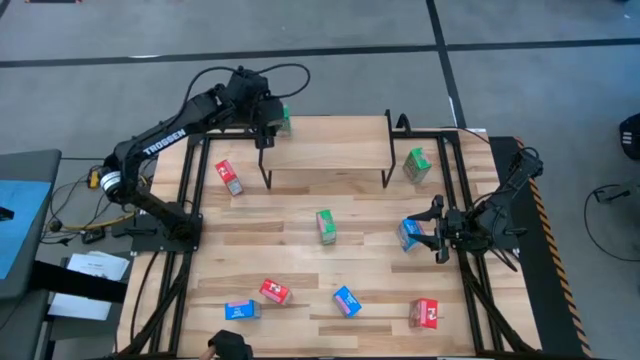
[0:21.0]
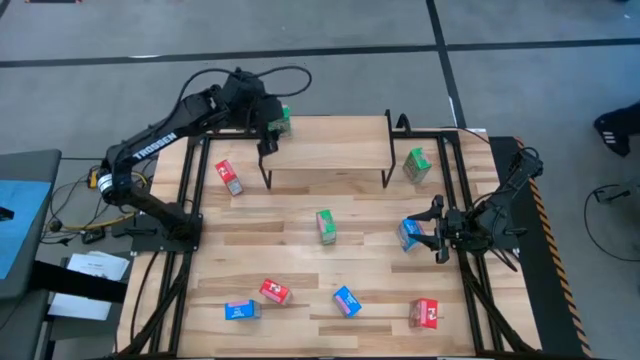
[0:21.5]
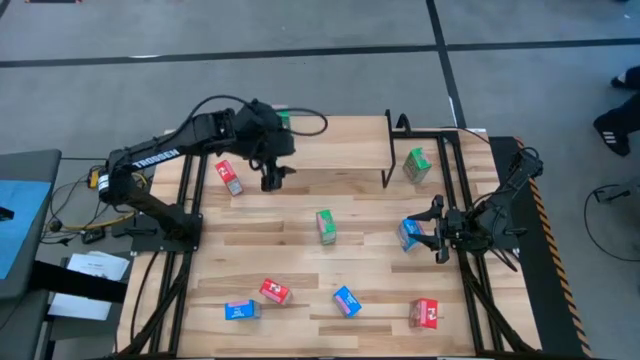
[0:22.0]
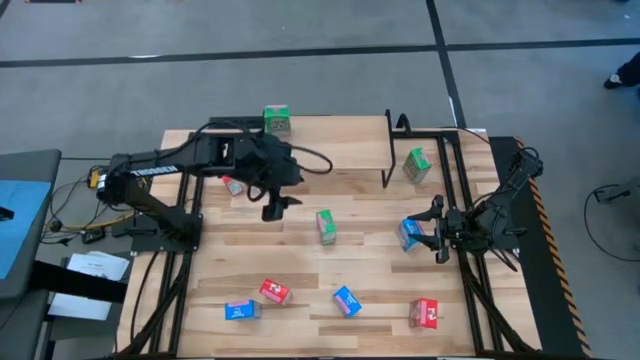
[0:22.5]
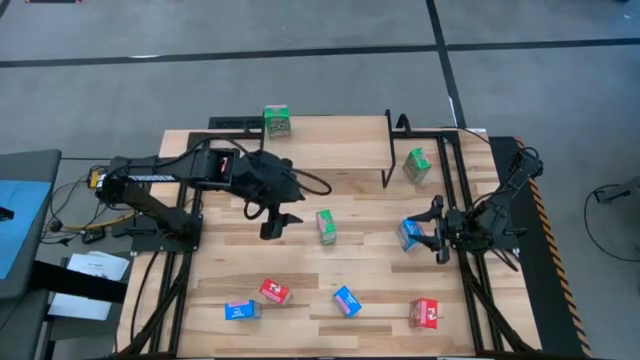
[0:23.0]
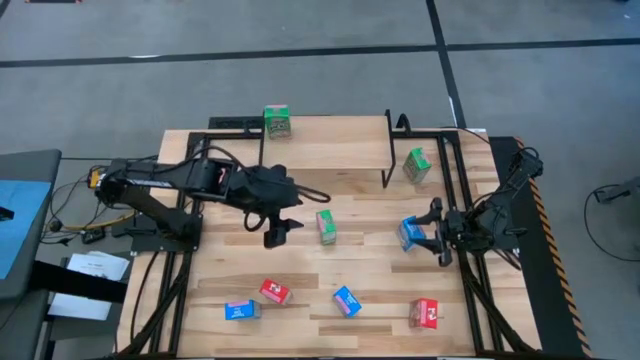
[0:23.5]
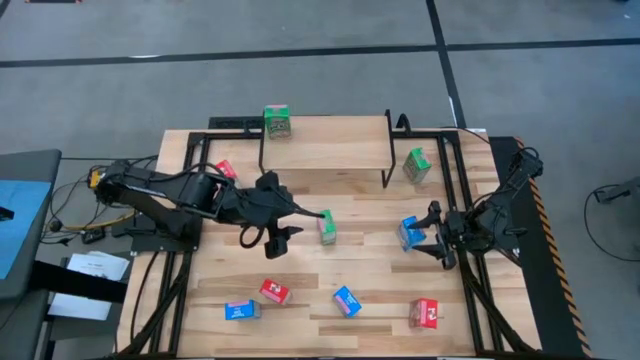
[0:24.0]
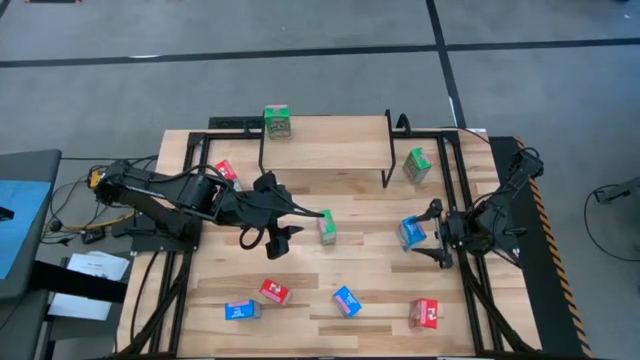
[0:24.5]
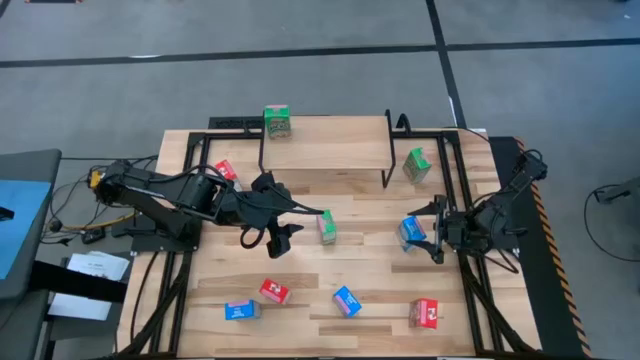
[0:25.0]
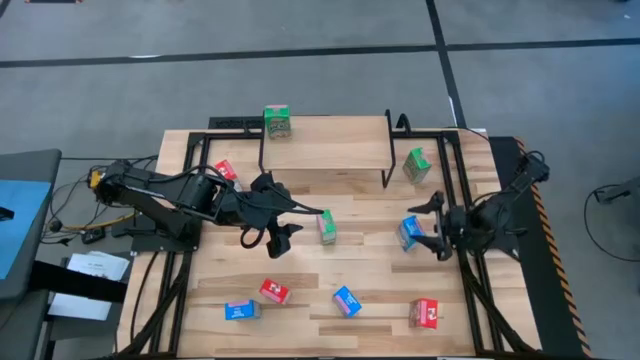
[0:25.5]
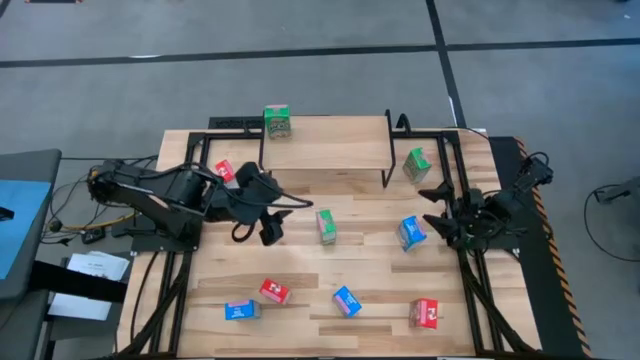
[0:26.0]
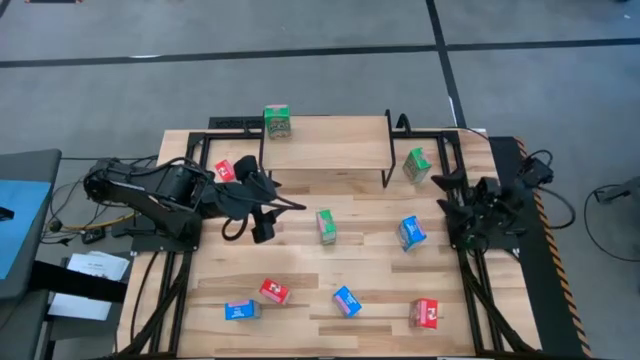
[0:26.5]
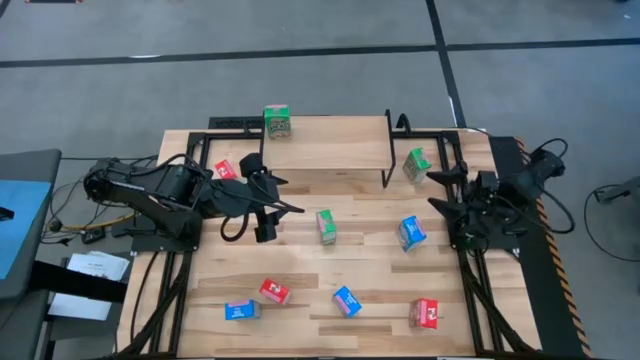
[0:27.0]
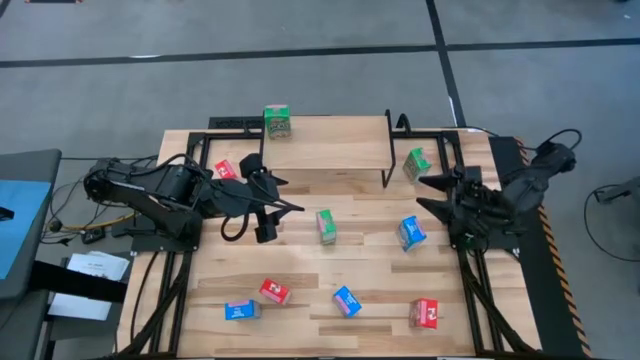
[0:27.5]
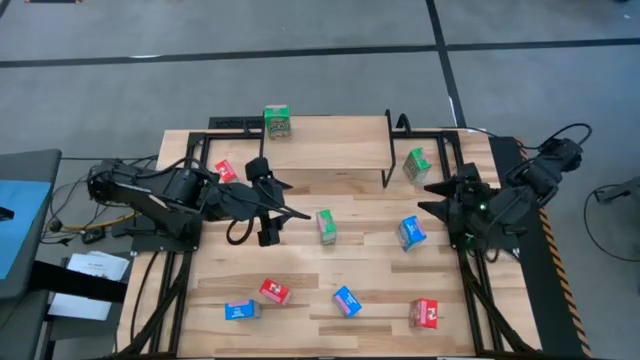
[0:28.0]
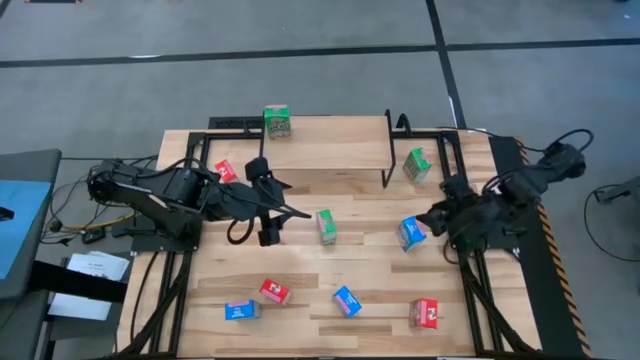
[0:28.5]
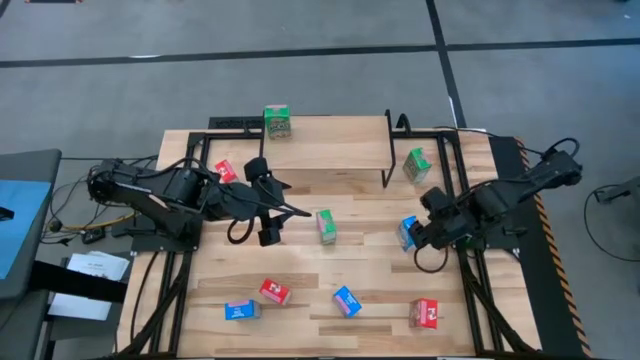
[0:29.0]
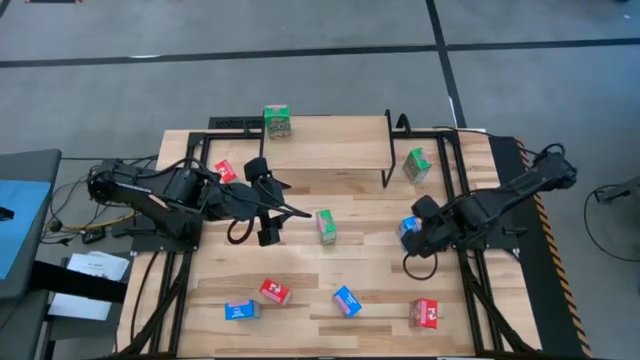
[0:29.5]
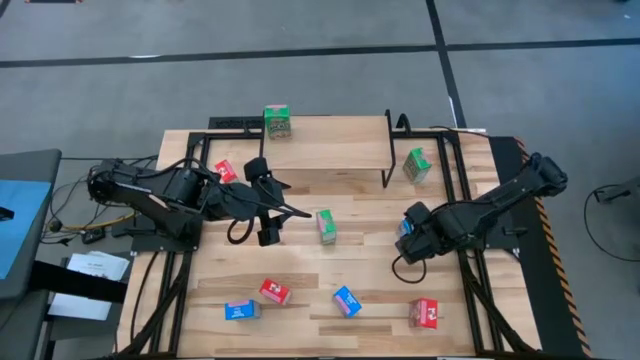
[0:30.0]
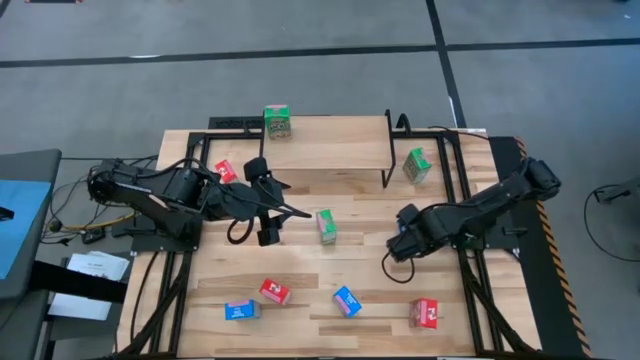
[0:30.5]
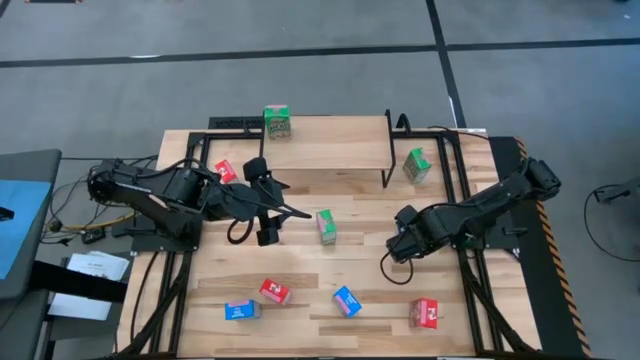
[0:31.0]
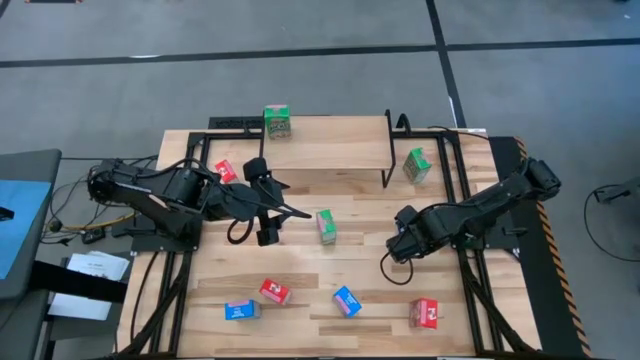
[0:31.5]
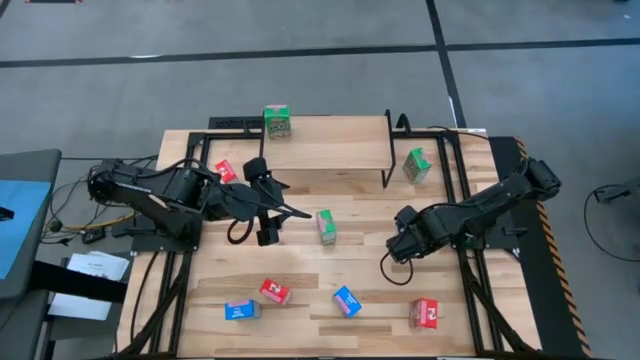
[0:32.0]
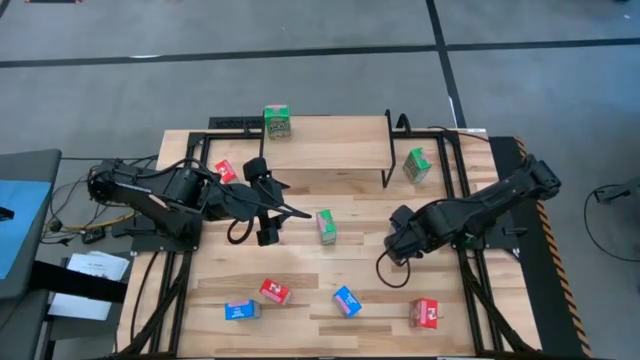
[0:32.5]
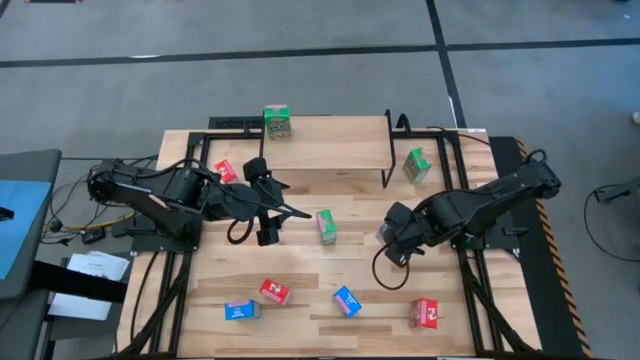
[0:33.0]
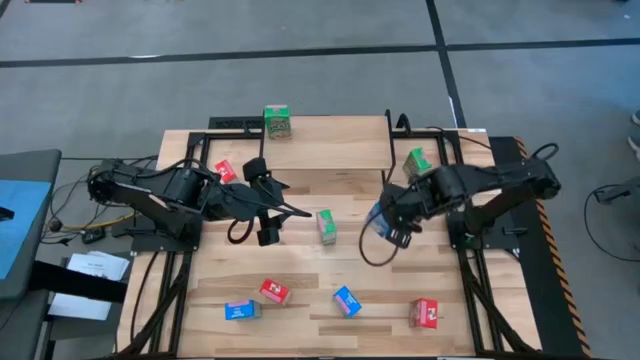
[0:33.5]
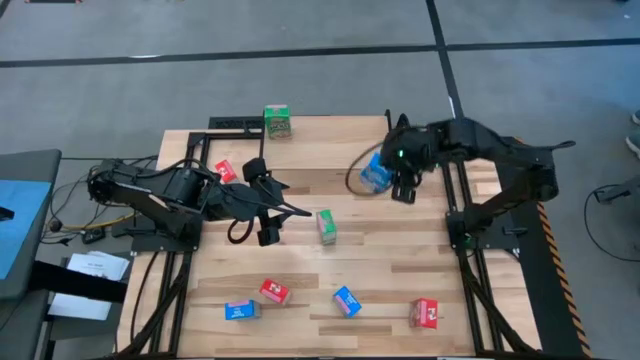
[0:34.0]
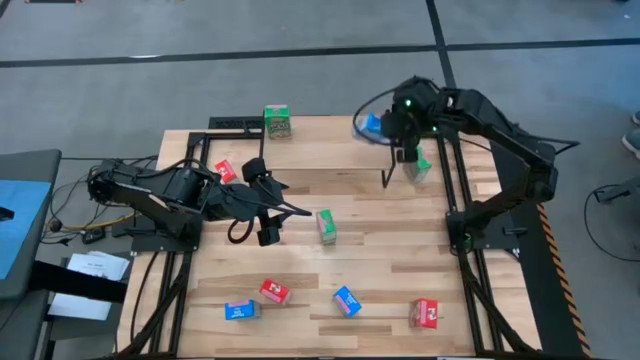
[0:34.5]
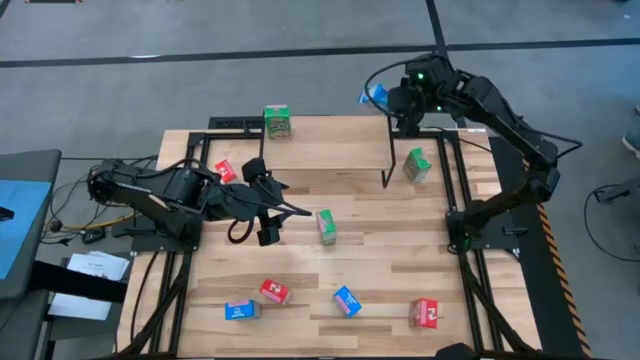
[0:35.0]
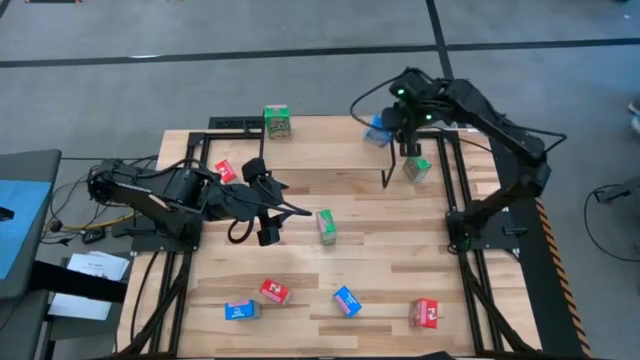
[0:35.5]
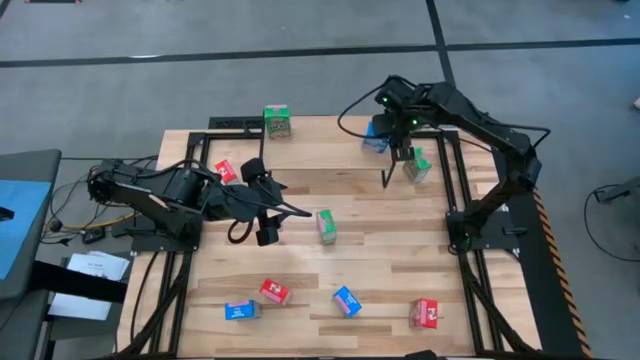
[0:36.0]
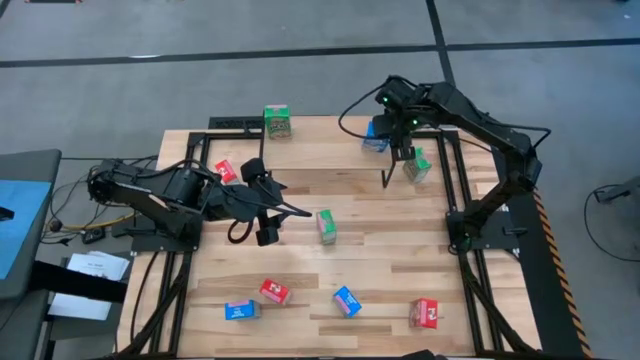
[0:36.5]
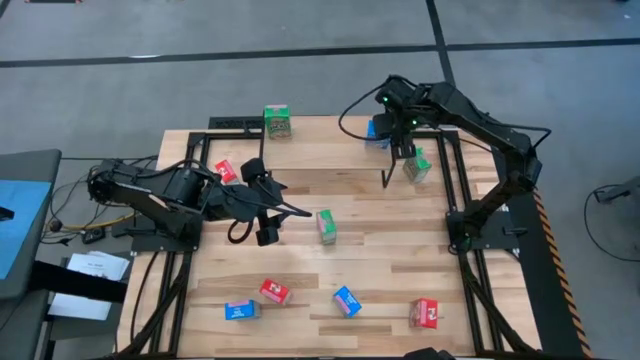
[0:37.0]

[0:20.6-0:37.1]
Task: Stack cereal on shelf
Put the top right blue cereal box on the shelf

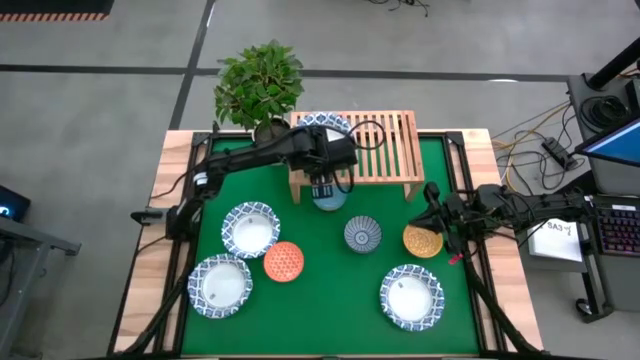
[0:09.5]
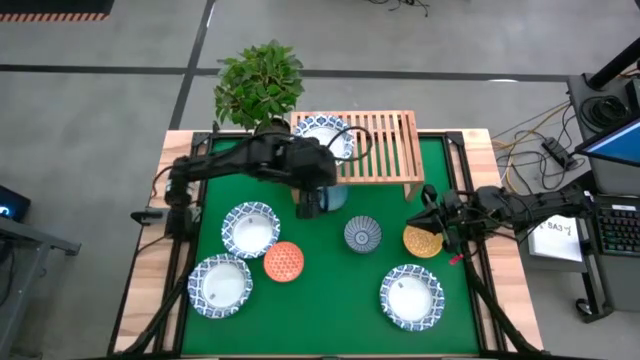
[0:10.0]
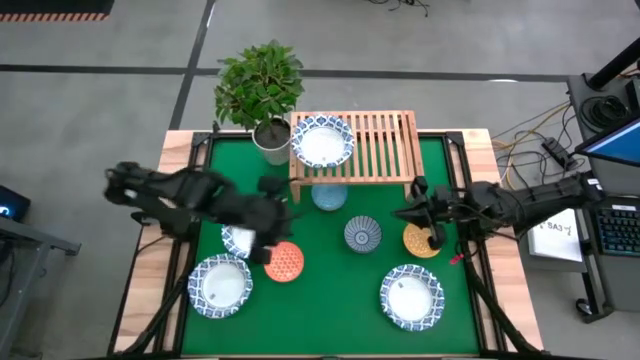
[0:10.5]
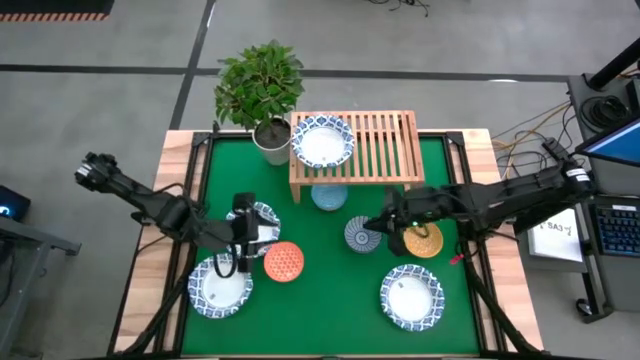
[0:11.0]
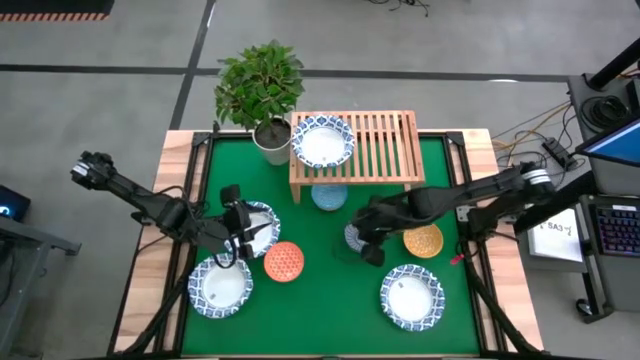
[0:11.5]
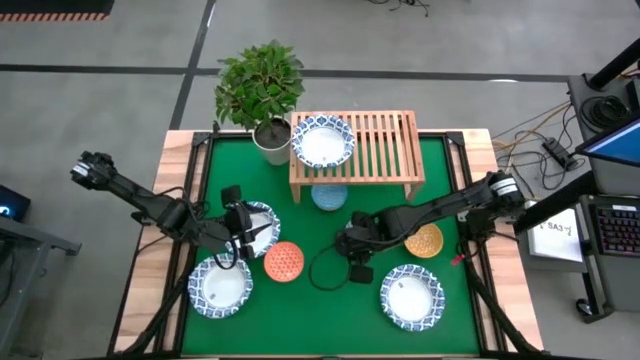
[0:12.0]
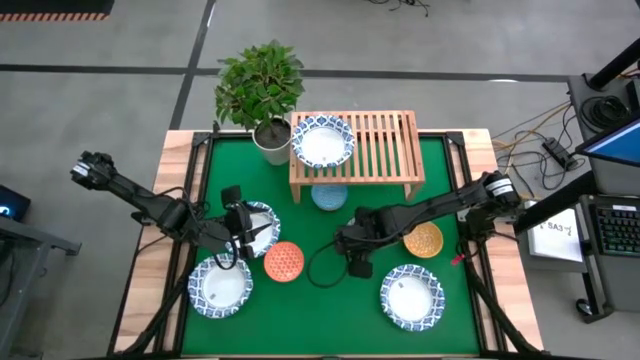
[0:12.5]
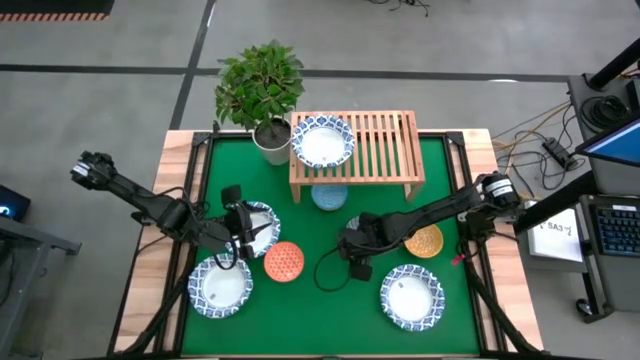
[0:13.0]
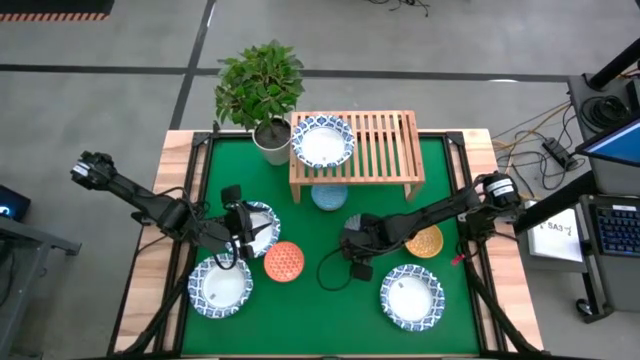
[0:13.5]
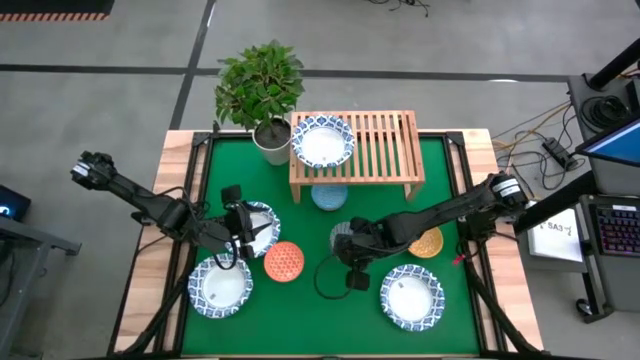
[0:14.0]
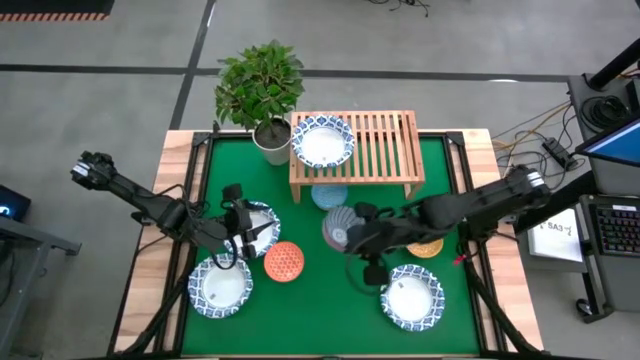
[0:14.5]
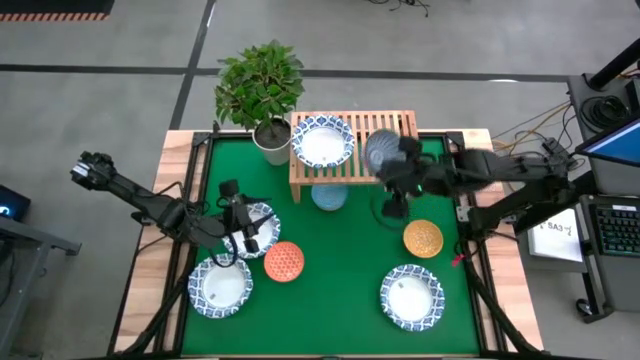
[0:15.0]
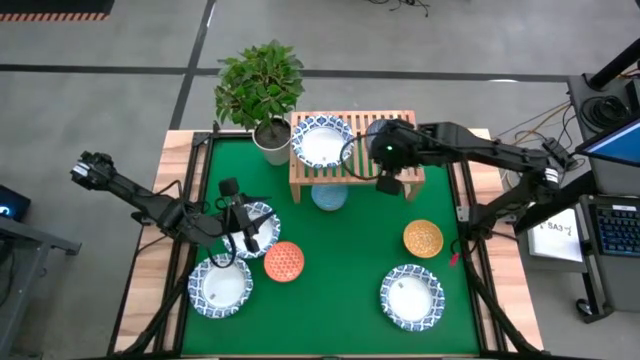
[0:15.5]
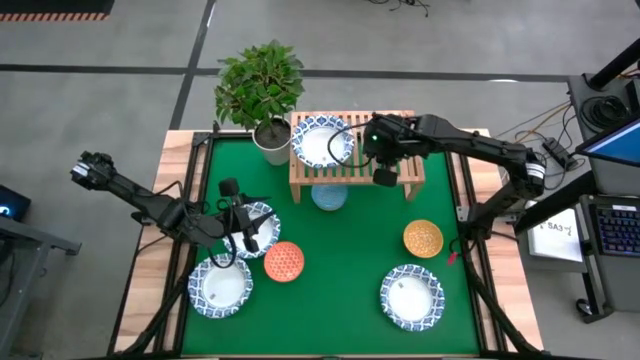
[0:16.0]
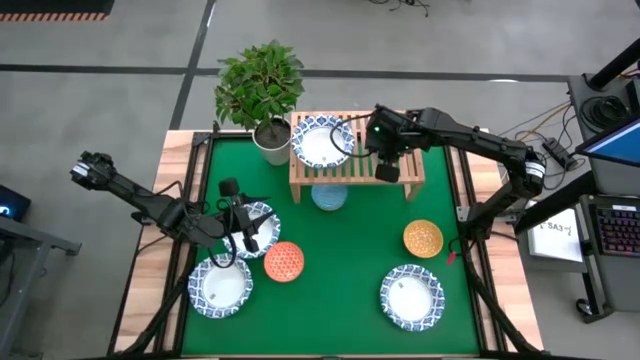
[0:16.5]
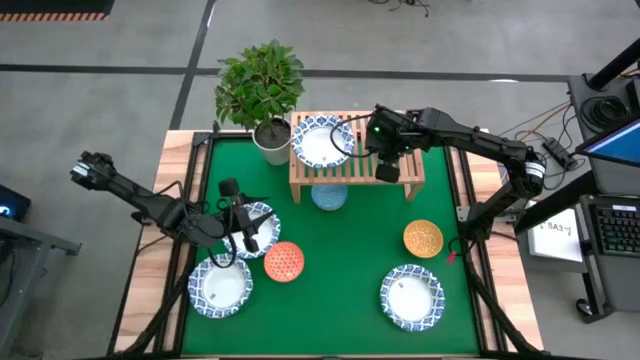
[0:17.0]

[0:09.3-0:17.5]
Task: Place and stack bowls onto a shelf
Put the red patterned bowl on the shelf
